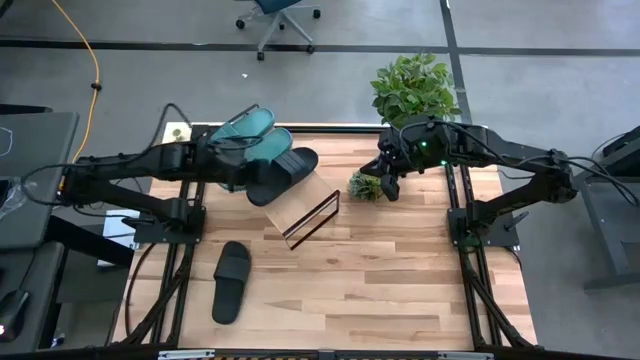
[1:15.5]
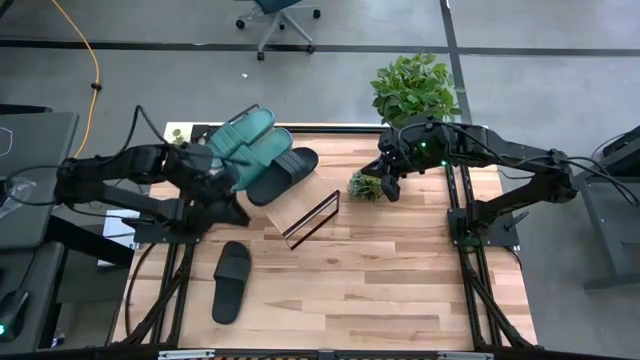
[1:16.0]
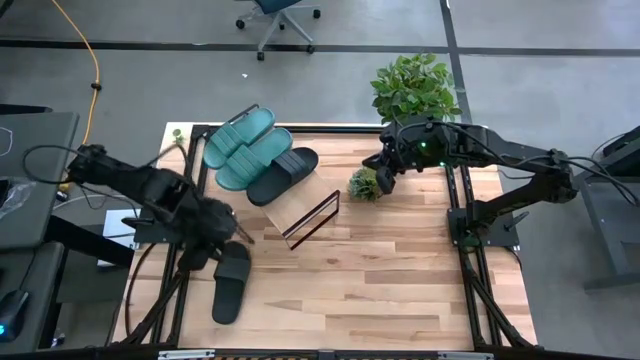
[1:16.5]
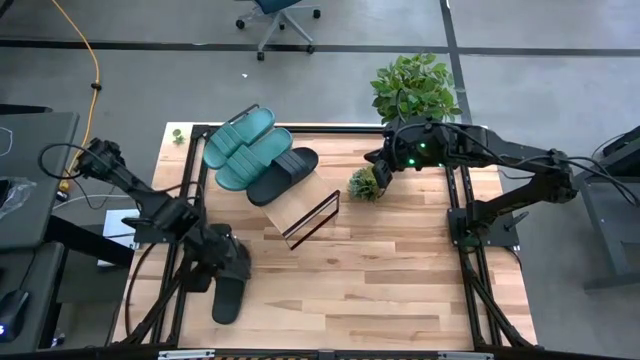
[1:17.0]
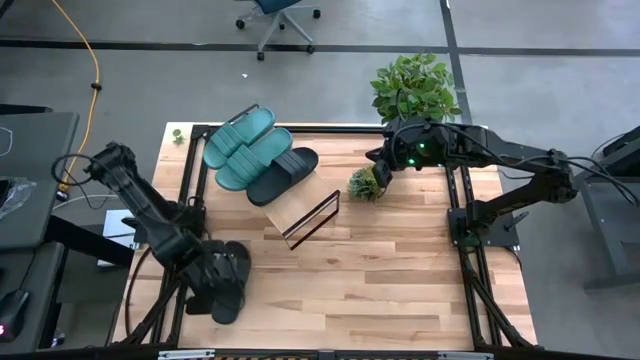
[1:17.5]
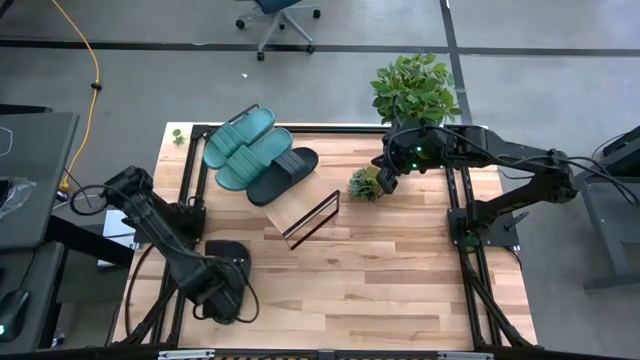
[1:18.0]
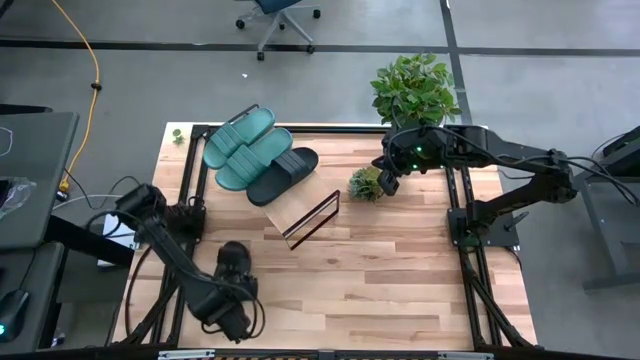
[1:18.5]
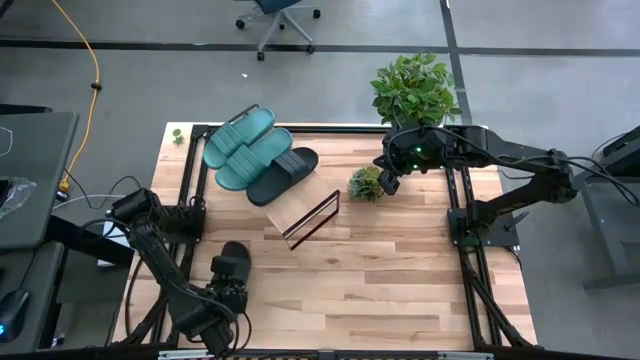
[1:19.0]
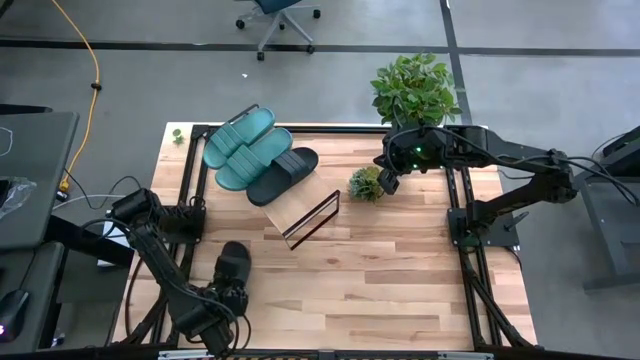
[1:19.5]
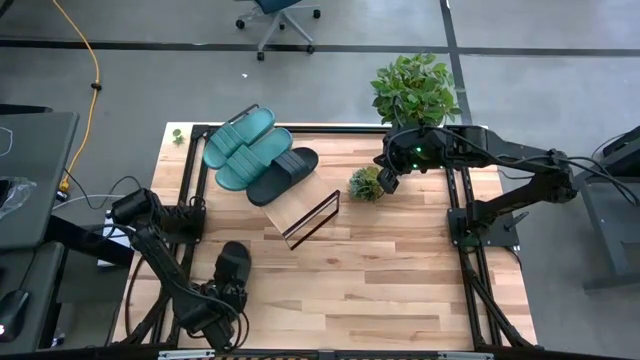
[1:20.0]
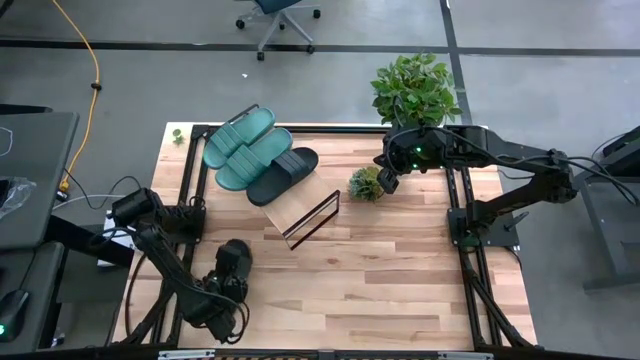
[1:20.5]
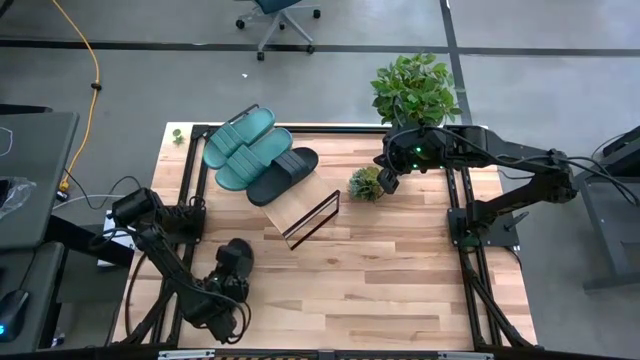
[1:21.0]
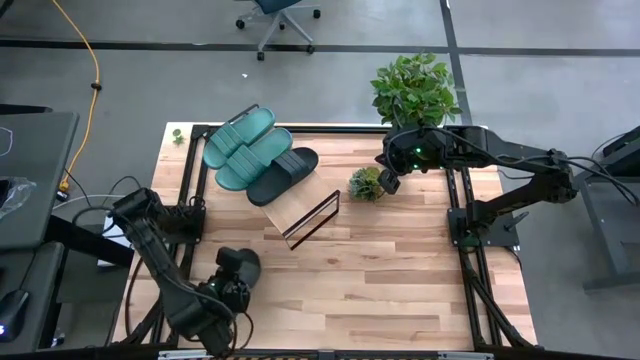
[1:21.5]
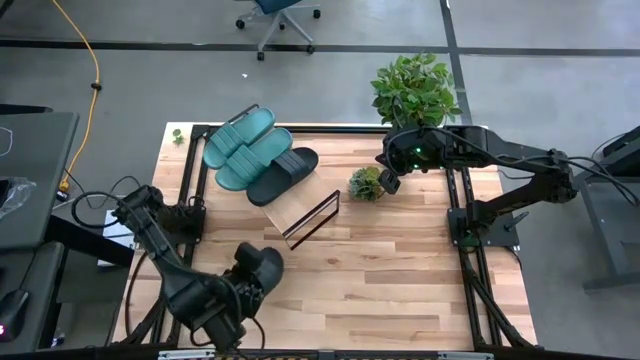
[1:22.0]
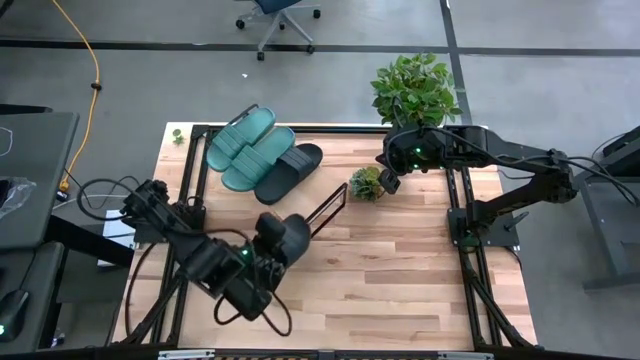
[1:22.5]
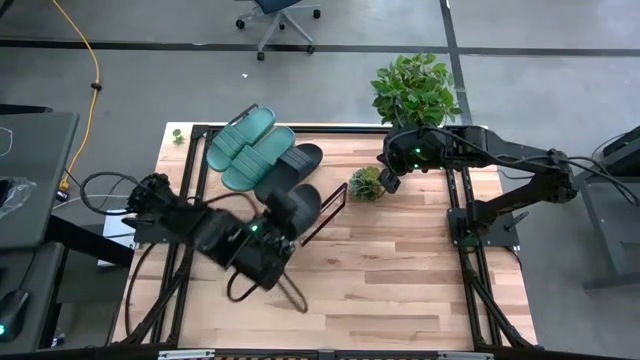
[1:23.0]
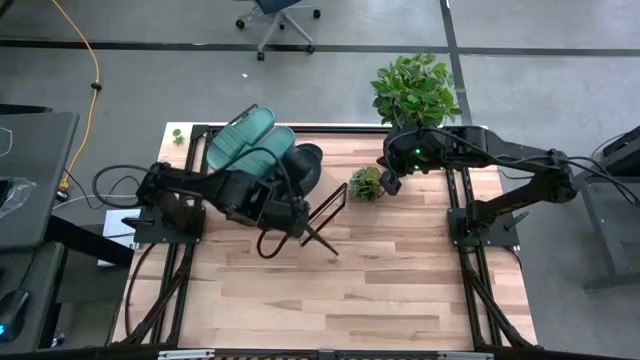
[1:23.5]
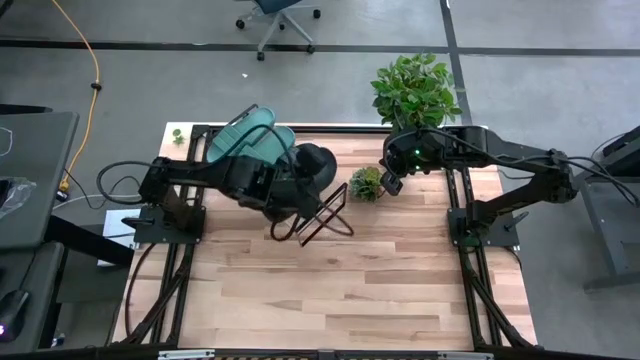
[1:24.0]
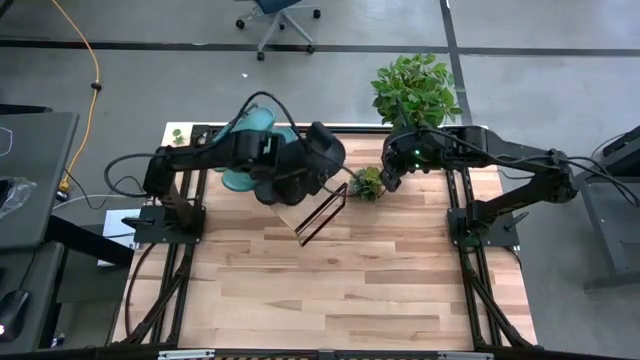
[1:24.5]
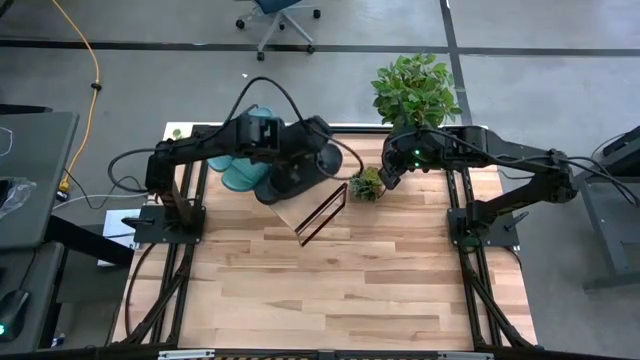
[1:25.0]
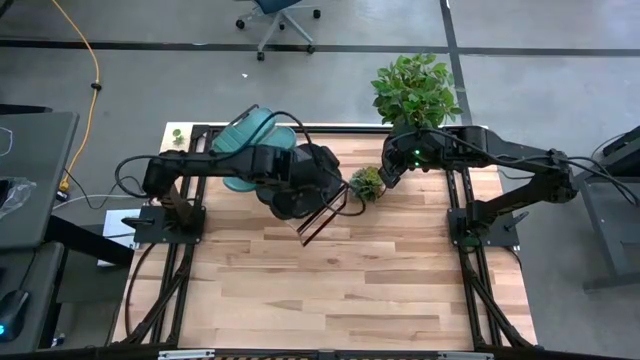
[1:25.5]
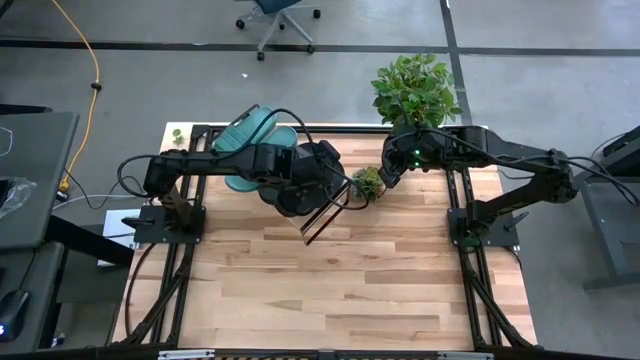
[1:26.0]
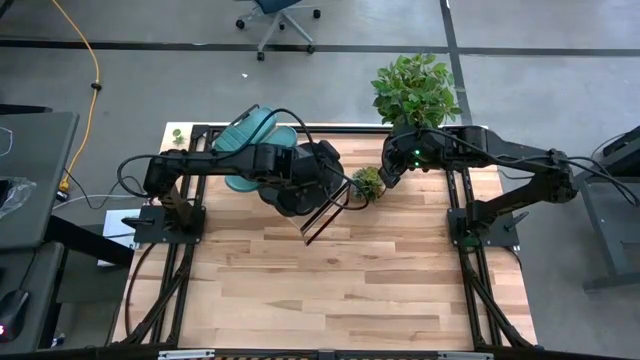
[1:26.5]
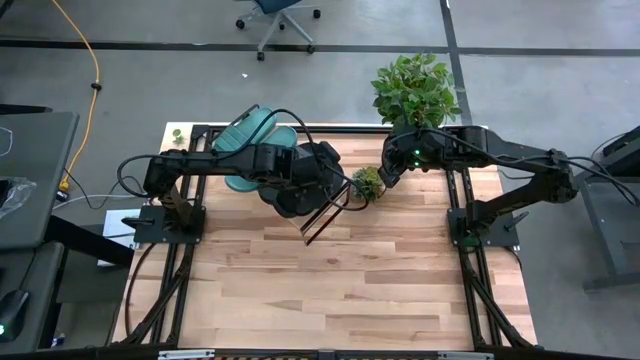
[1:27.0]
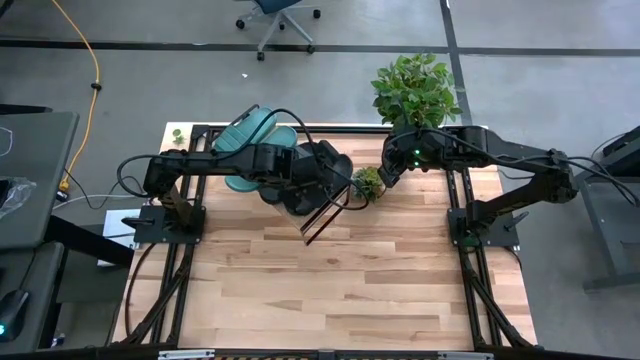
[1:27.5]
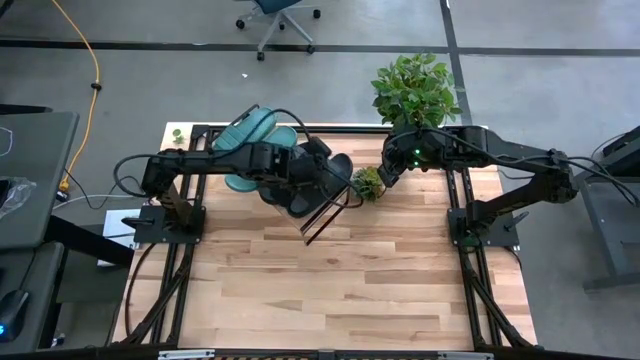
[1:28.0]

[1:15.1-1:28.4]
Task: Pick and place slippers onto the shelf
Put the black pair of slippers on the shelf

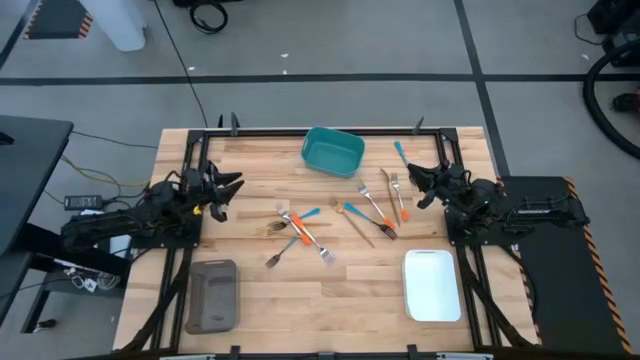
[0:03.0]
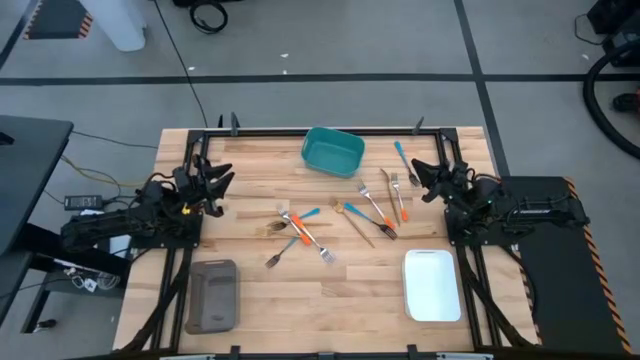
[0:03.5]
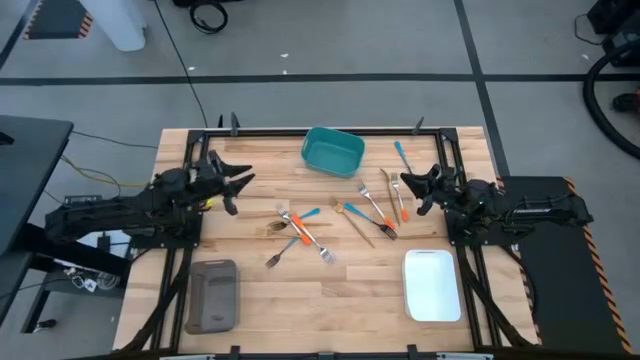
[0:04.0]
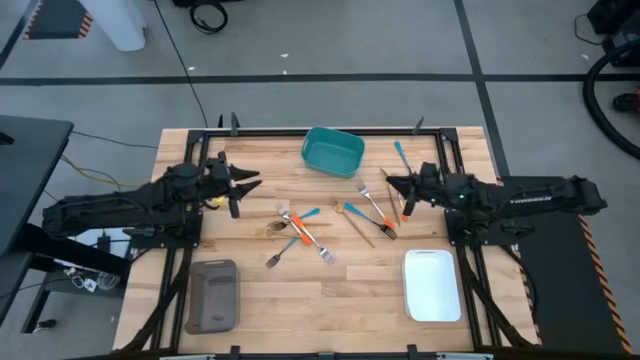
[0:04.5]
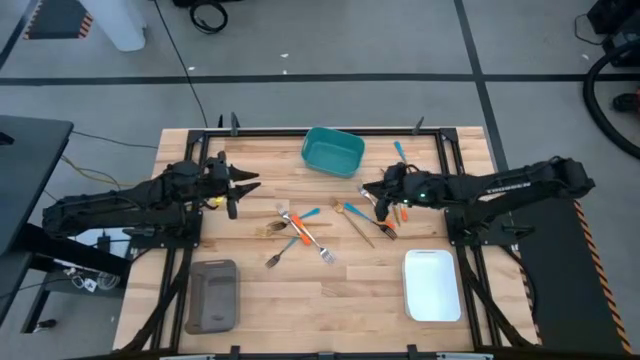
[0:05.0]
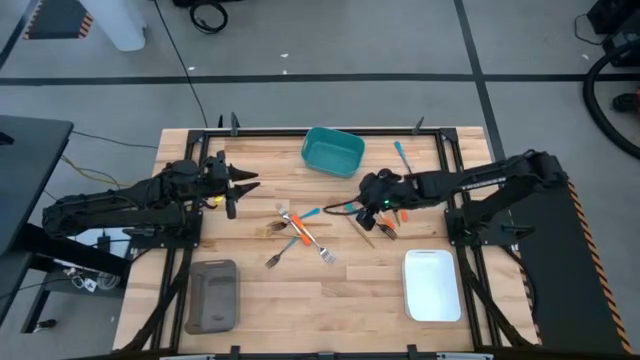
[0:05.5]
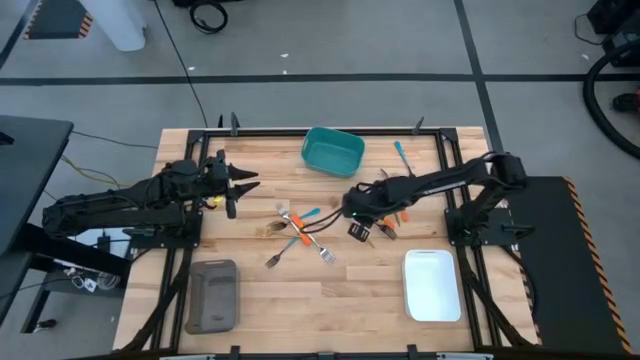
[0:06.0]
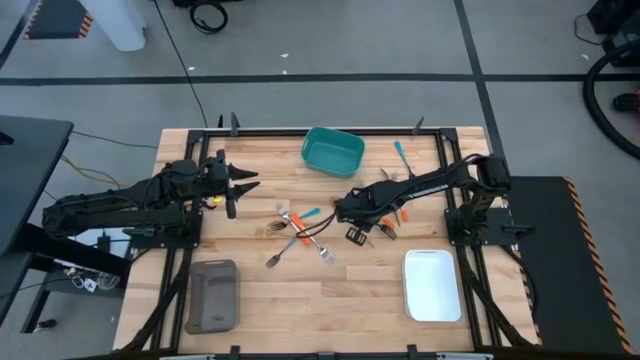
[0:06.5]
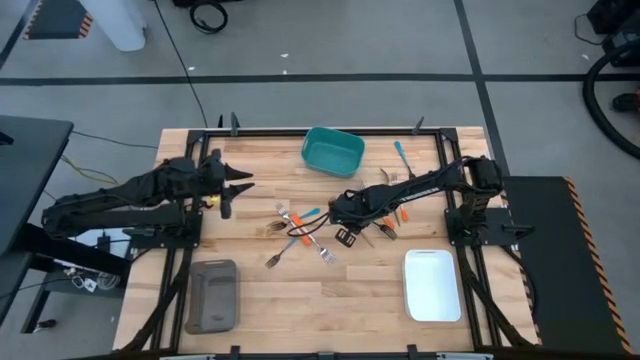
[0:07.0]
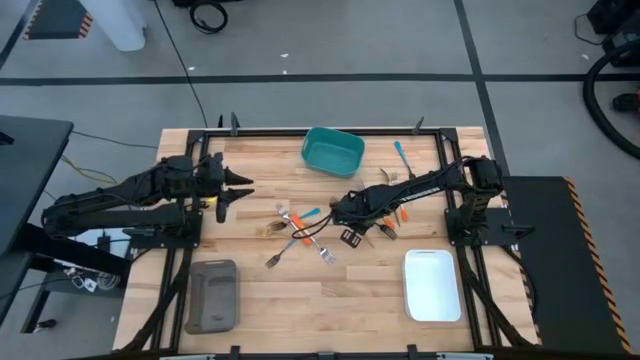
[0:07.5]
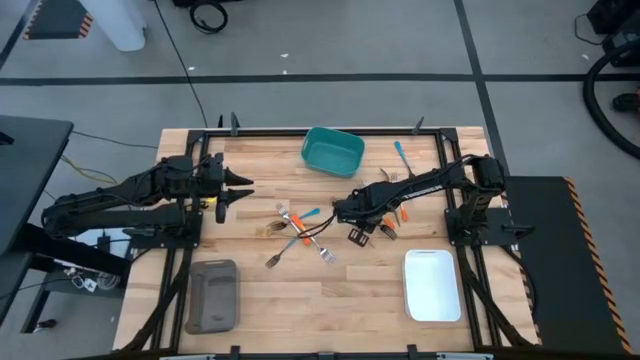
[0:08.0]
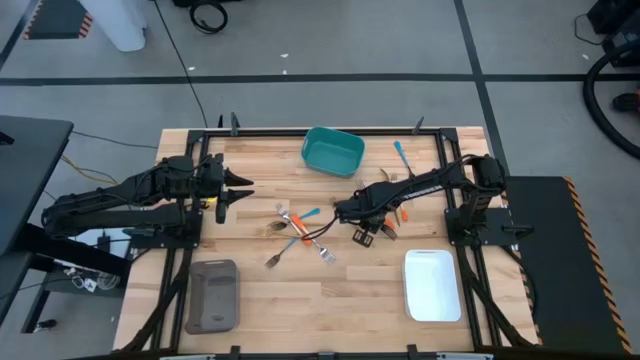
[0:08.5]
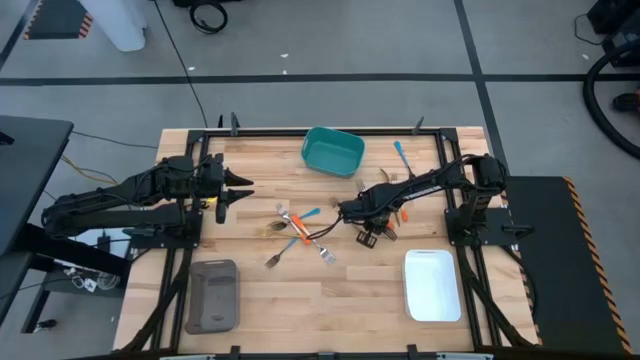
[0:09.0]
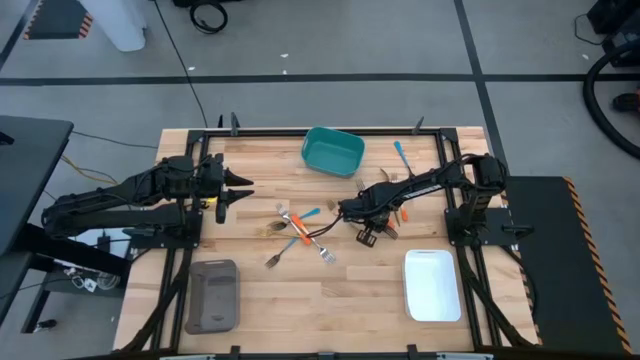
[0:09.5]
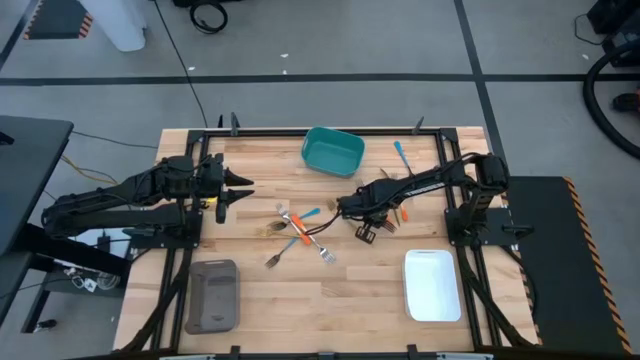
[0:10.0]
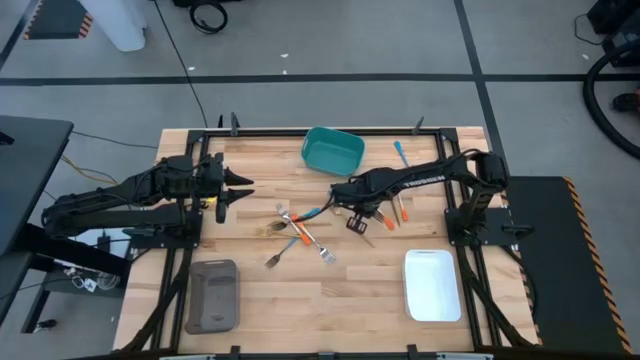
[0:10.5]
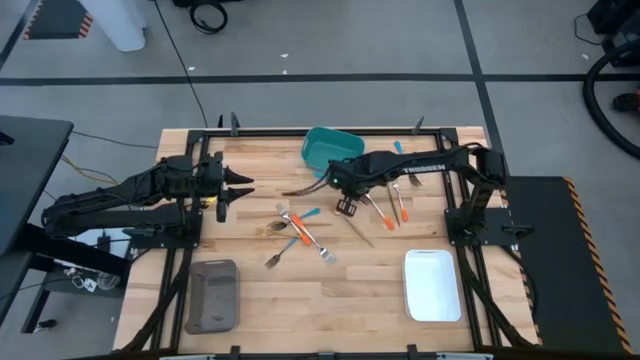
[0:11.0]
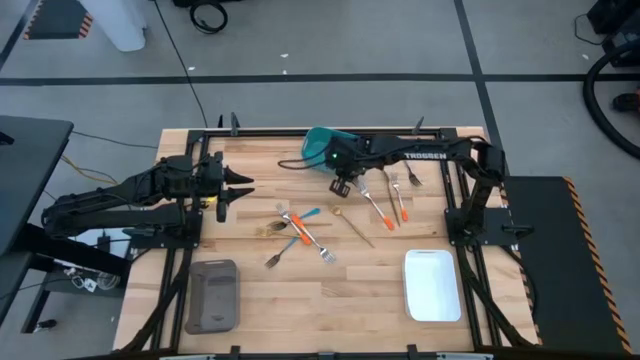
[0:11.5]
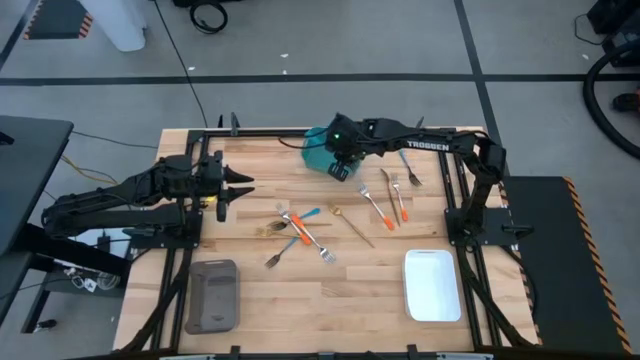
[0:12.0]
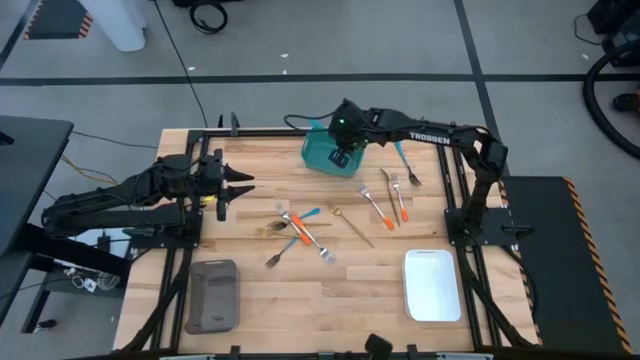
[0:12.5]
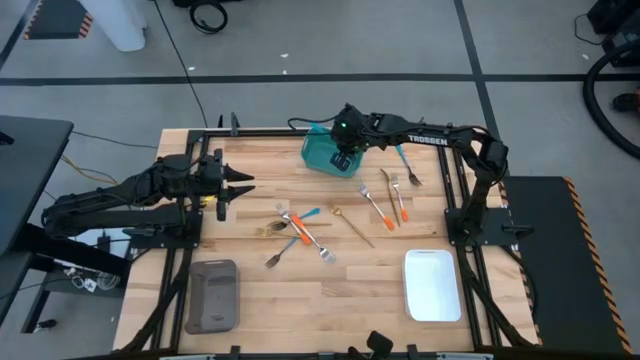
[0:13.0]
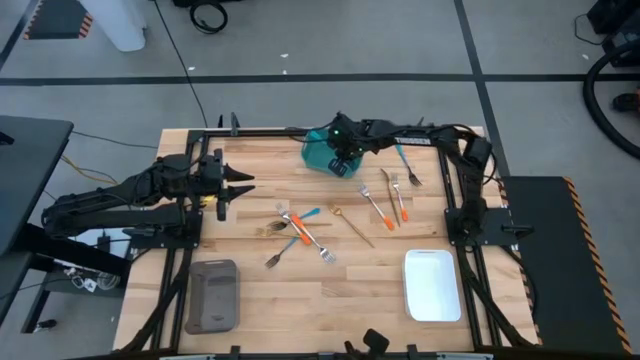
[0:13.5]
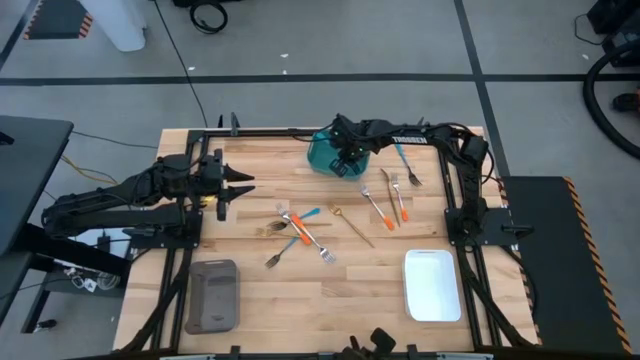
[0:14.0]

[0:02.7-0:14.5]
Task: Sort silverware by color (type)
Put the blue fork into the green bin
